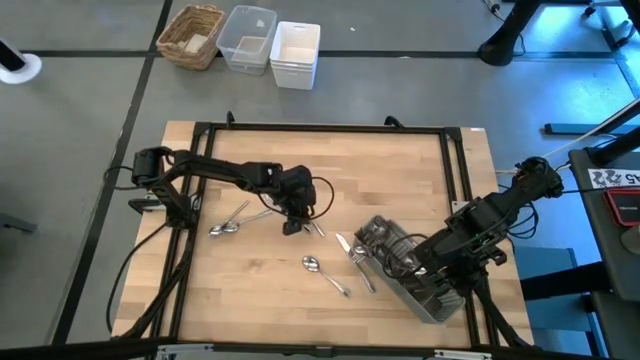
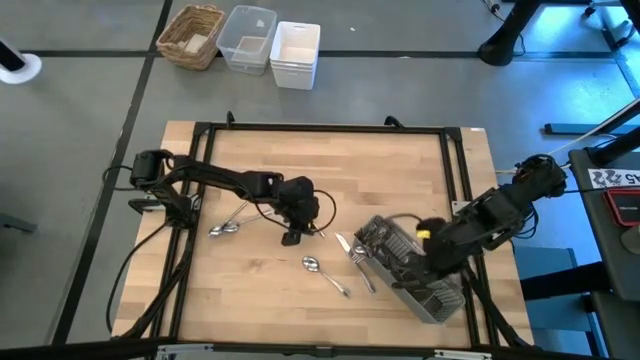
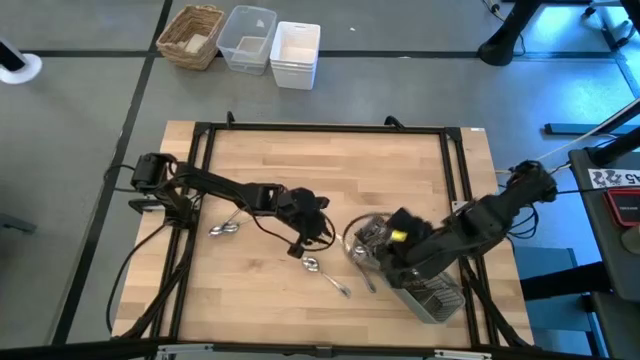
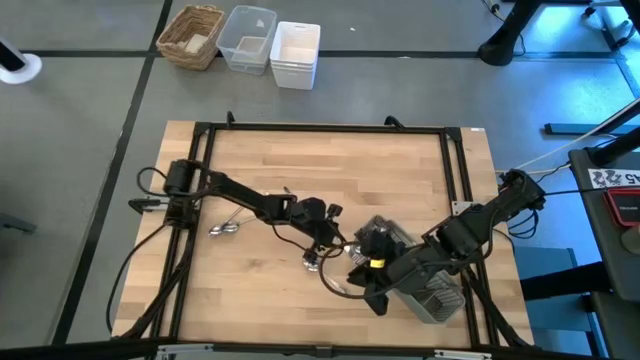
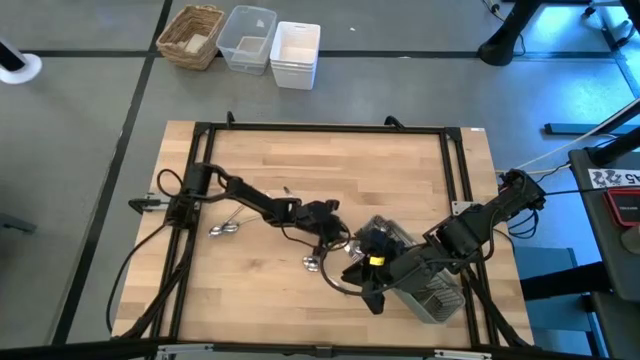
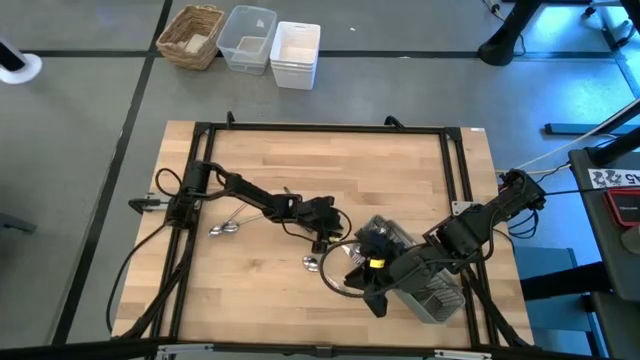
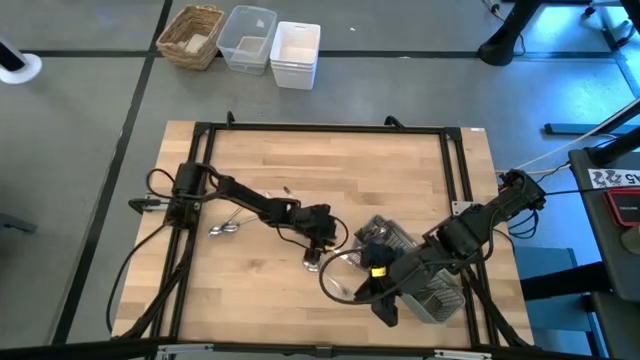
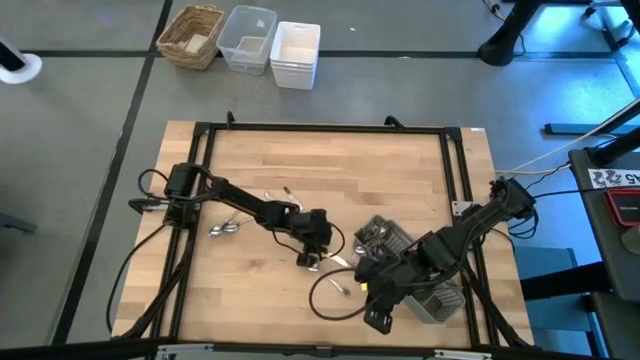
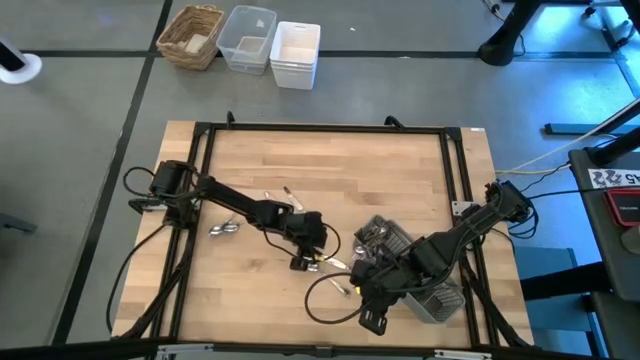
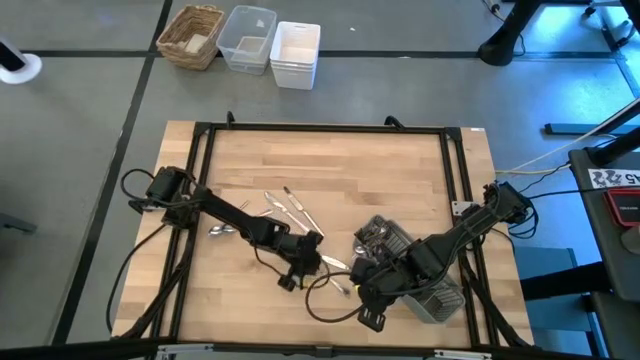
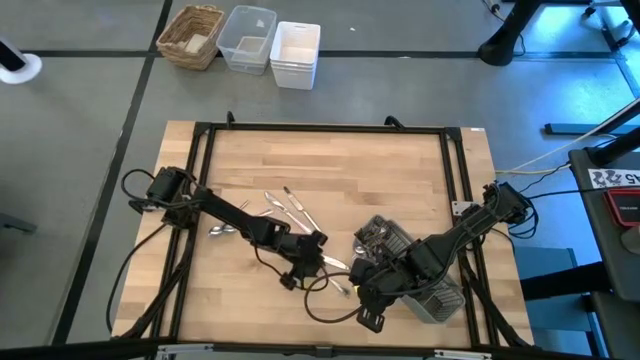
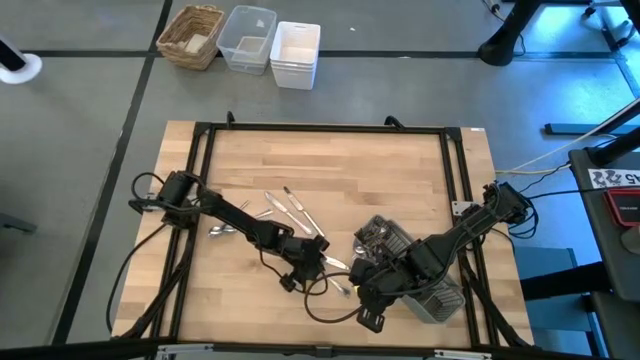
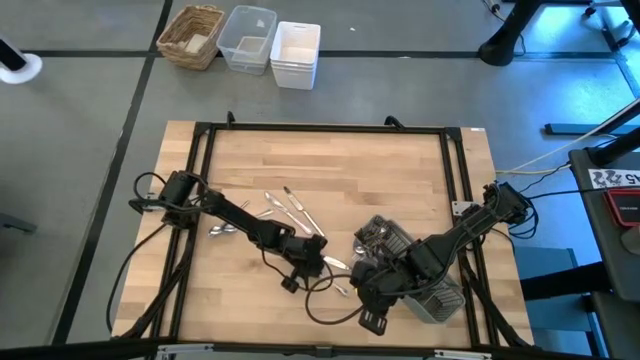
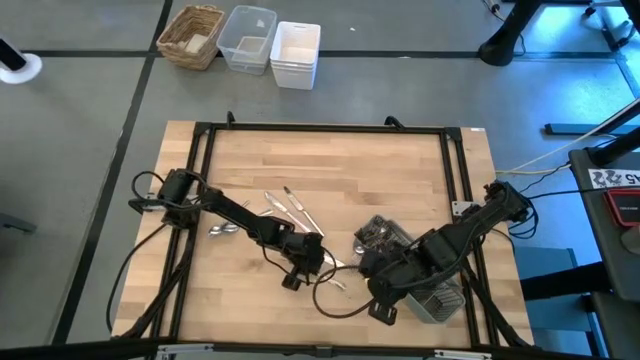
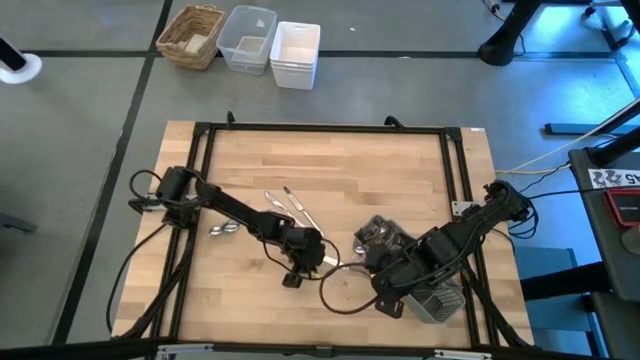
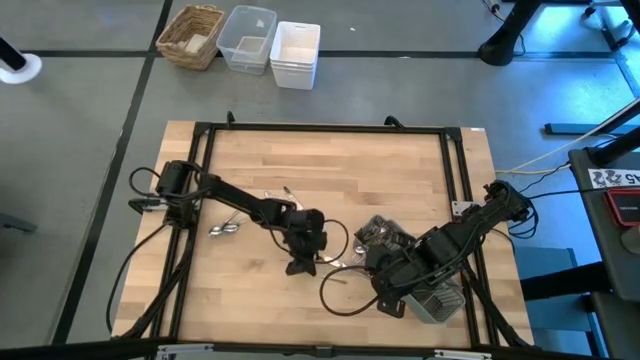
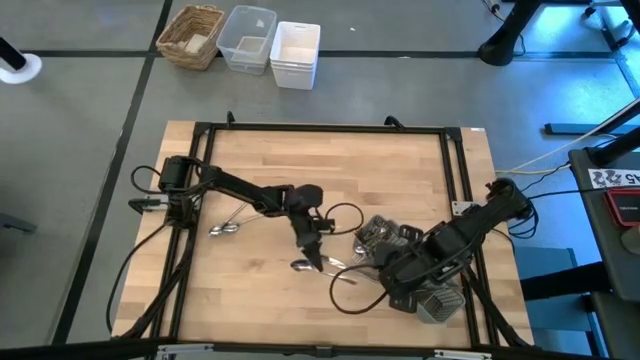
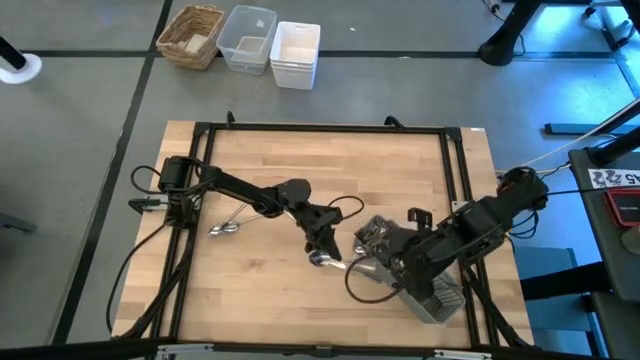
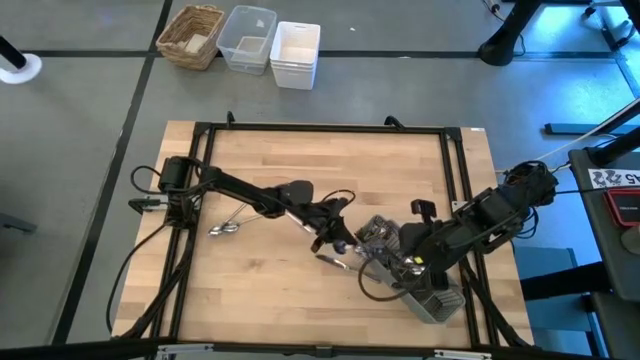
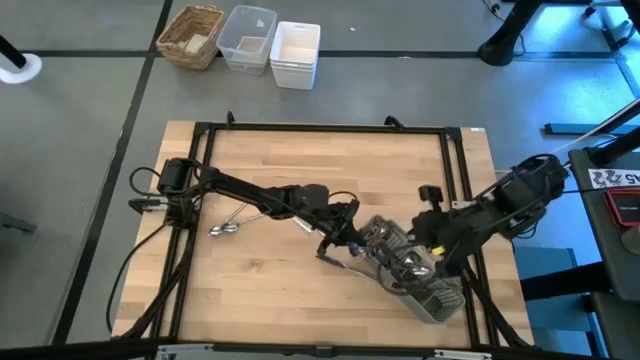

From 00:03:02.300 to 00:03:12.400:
Task: Sort silverware
Put the silver spoon into the gray silverware basket

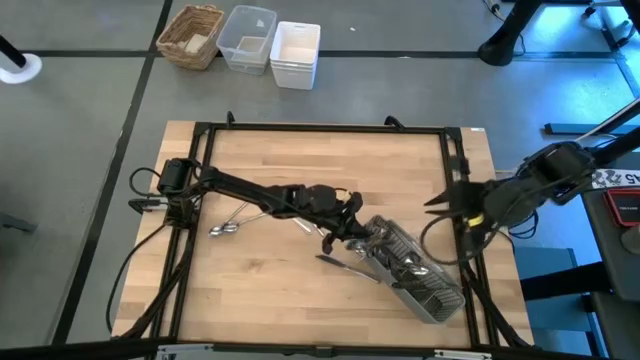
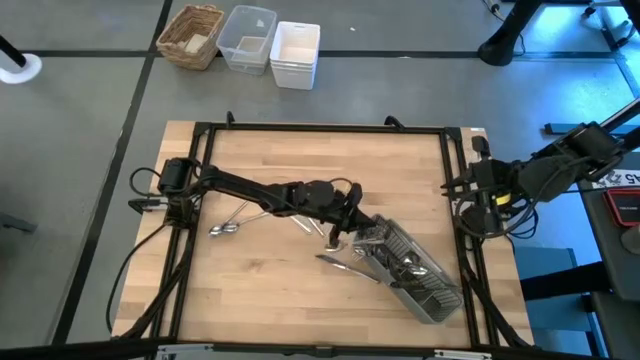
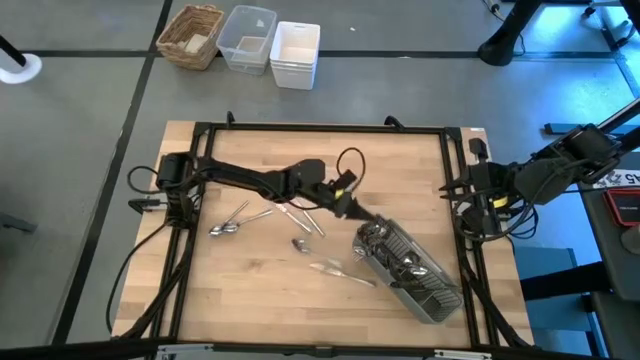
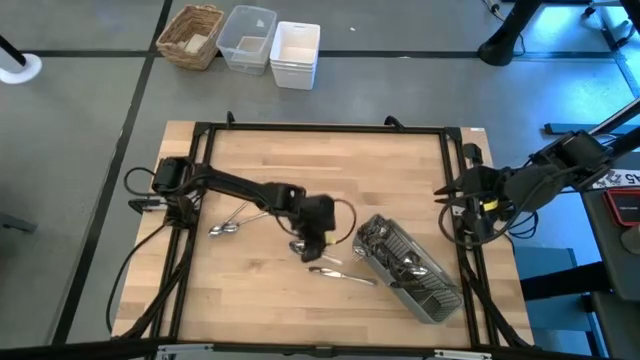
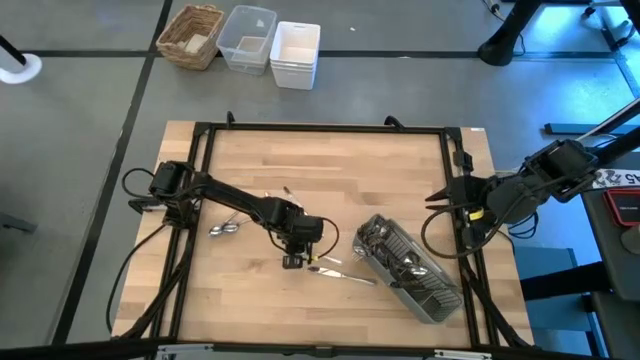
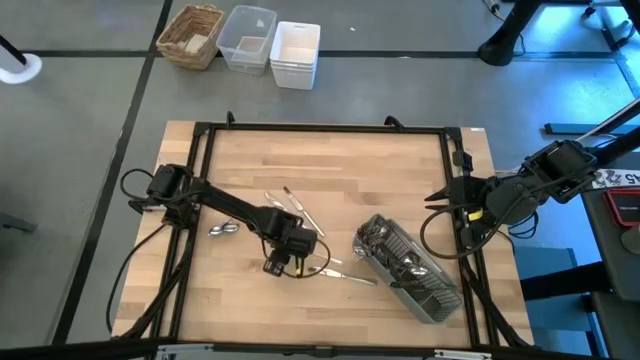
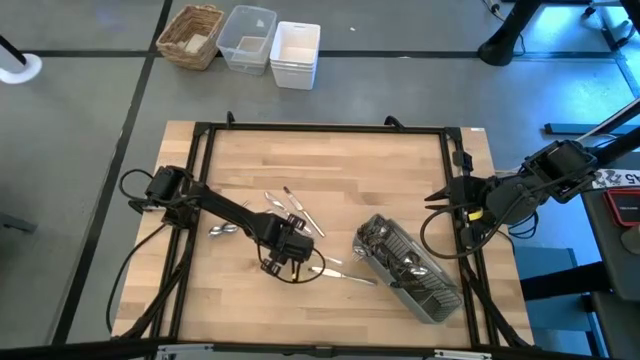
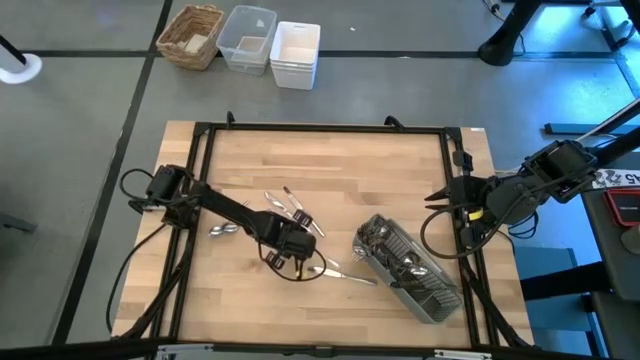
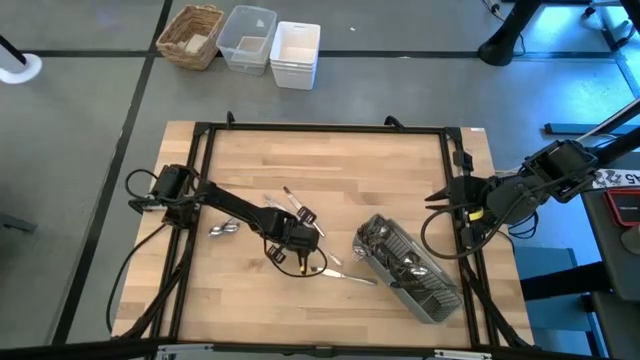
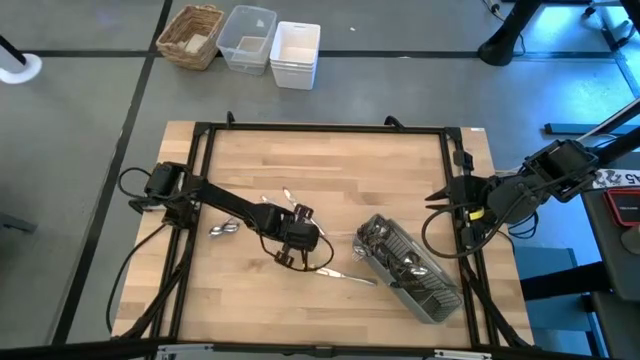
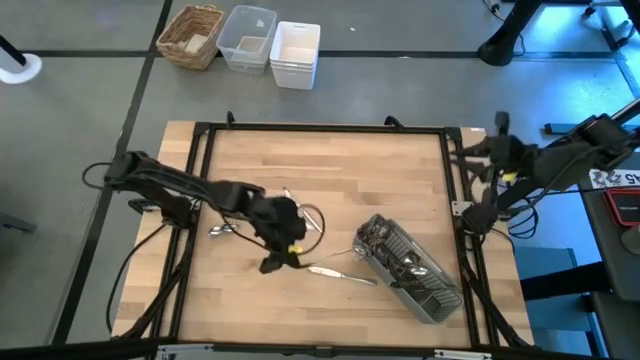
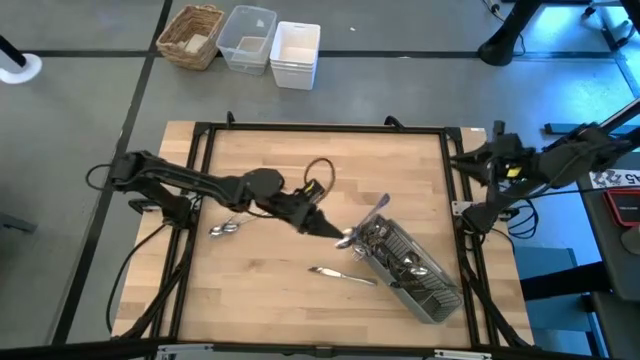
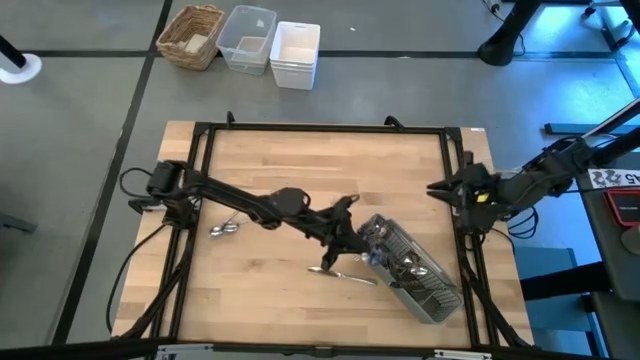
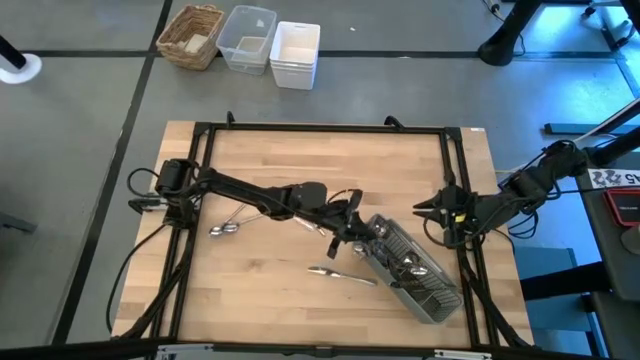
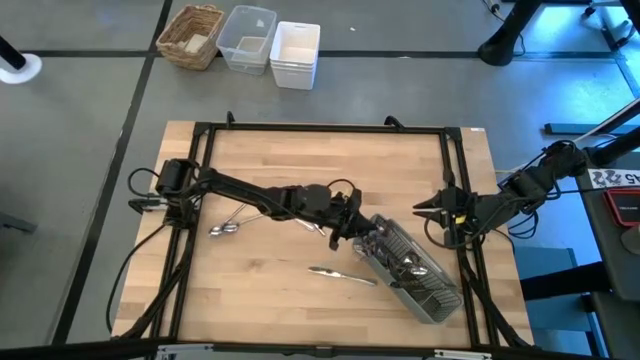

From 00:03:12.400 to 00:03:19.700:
Put the silver spoon into the gray silverware basket

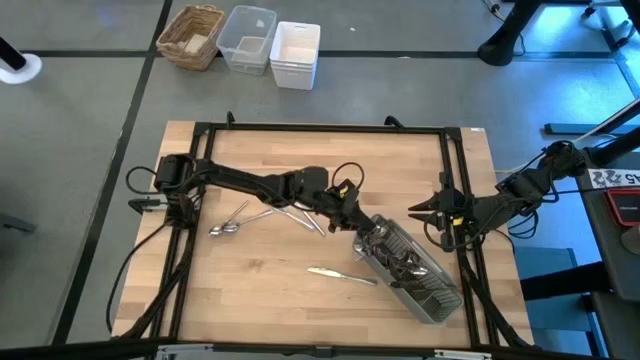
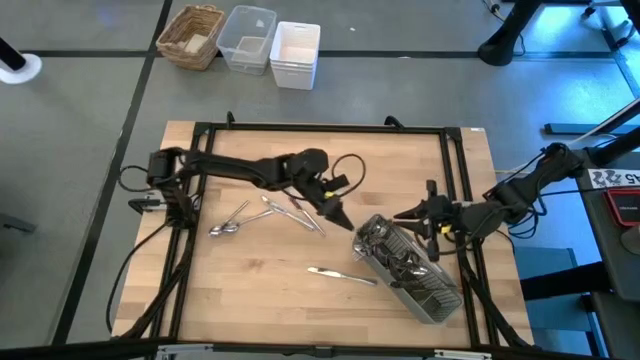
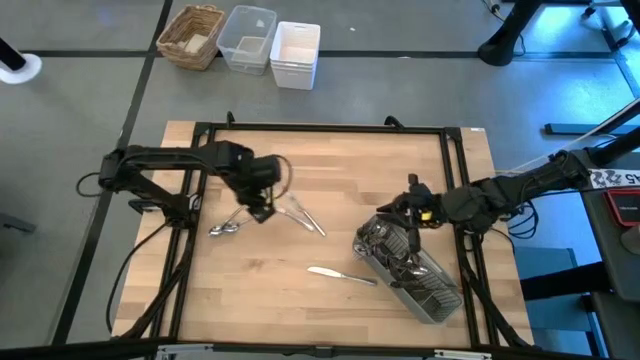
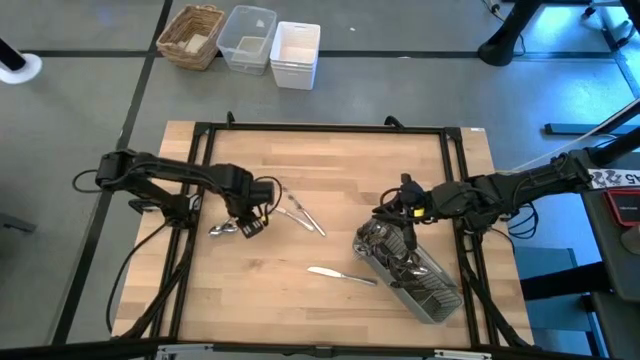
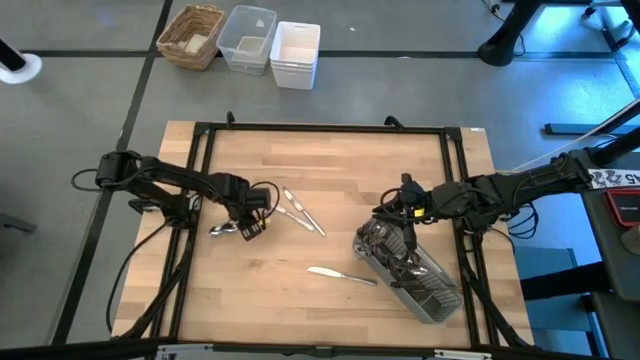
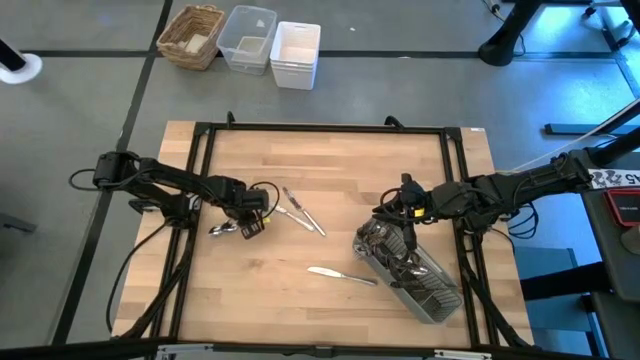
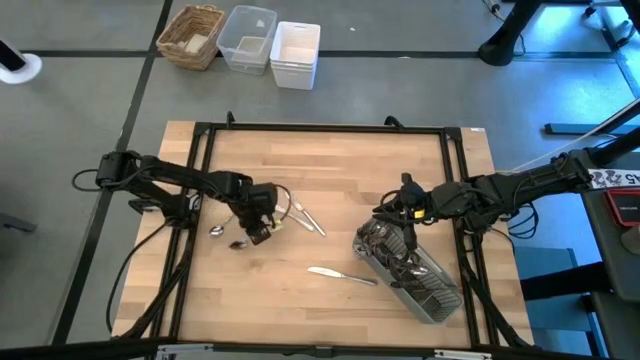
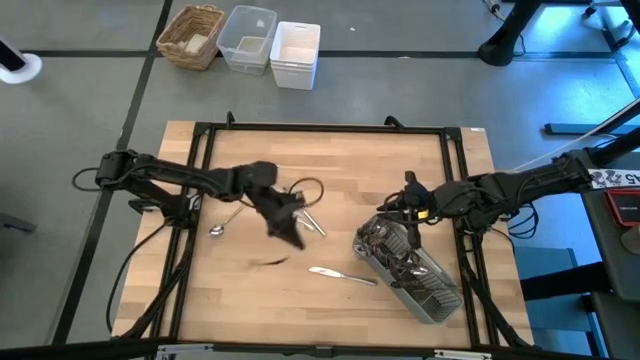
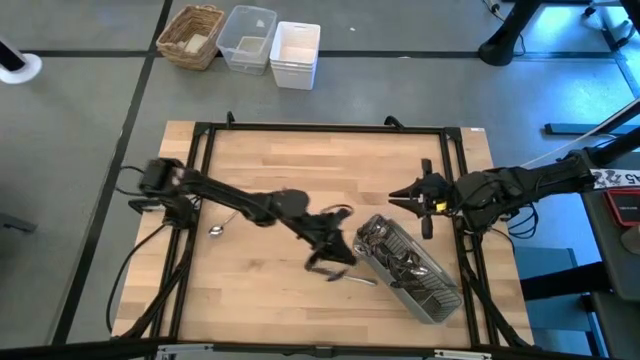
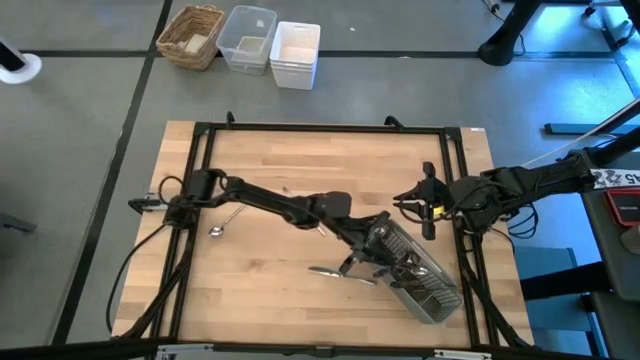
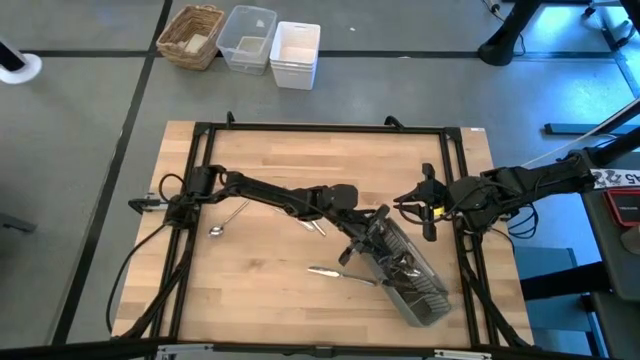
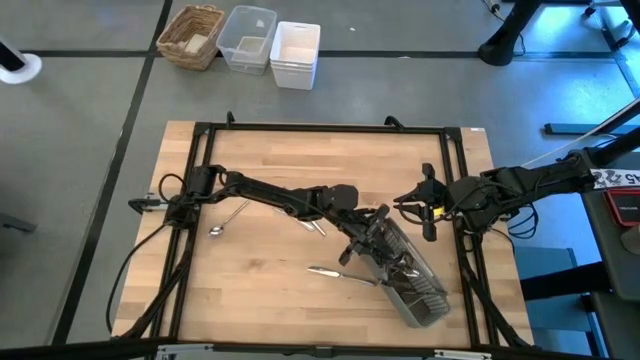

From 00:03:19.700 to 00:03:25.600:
Put the silver spoon into the gray silverware basket
